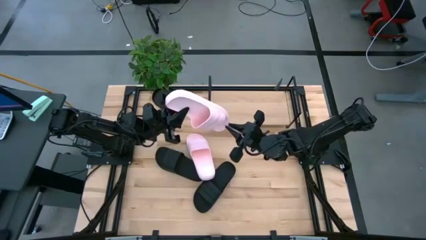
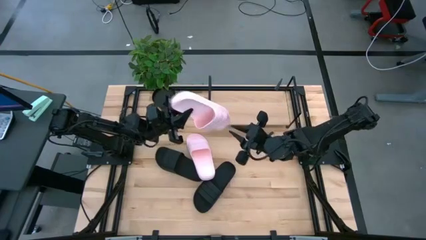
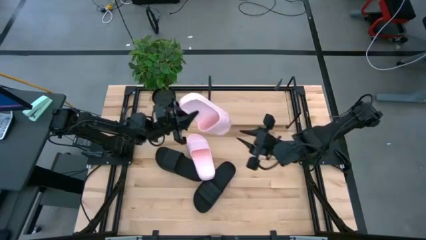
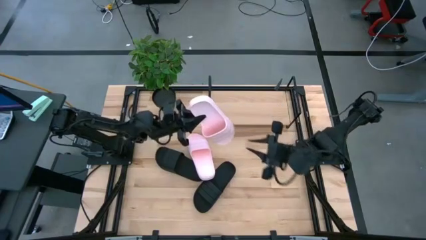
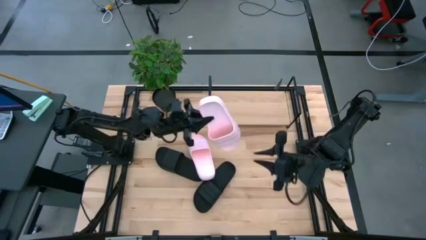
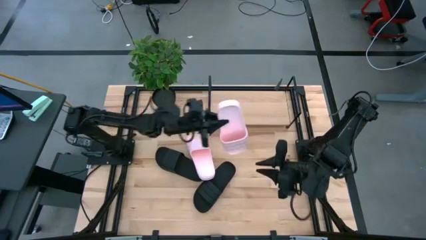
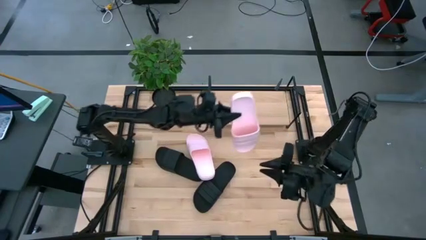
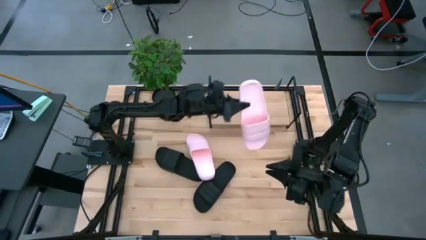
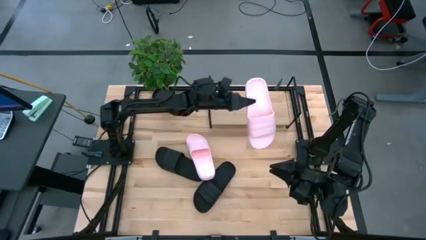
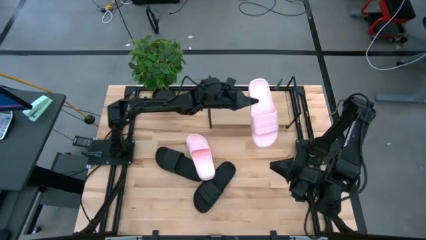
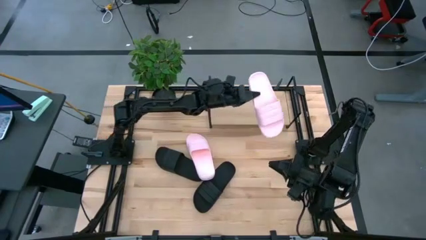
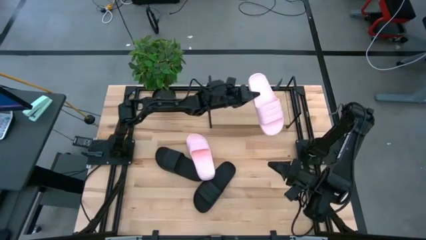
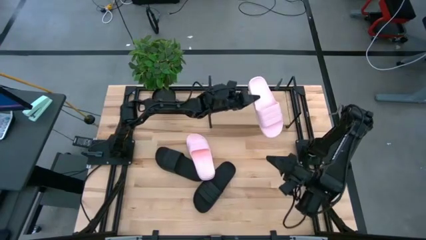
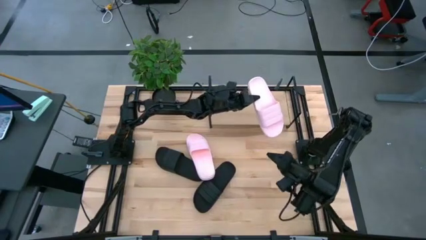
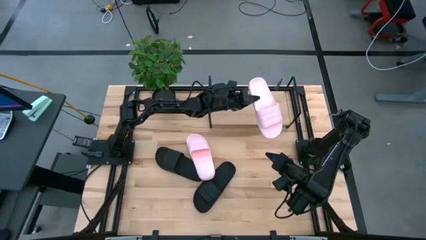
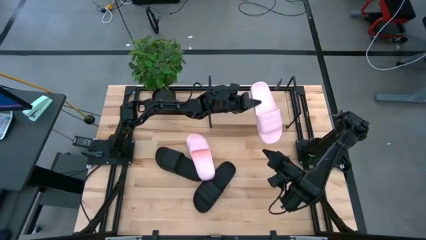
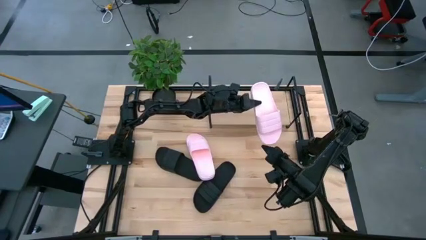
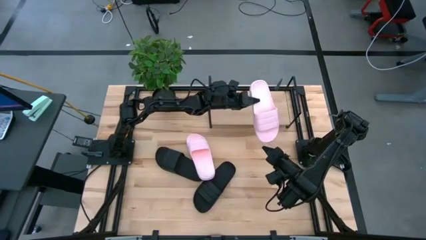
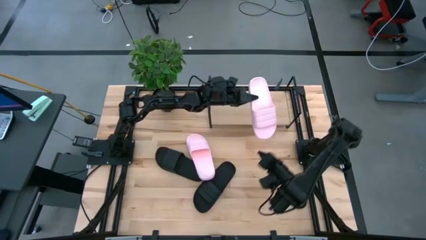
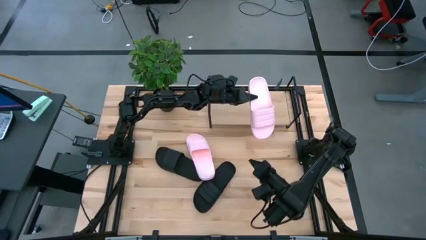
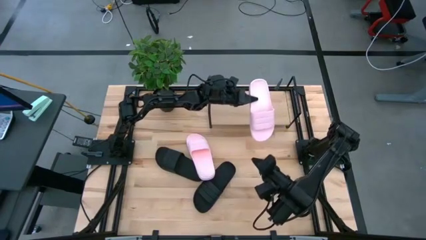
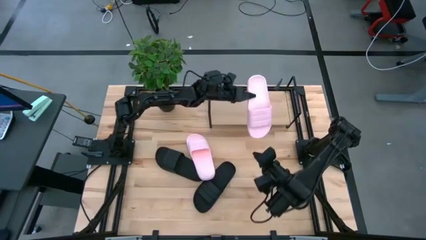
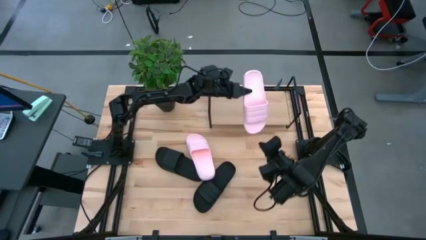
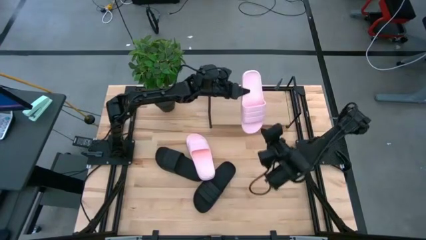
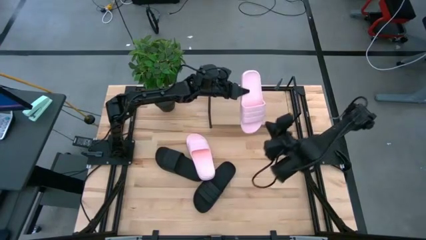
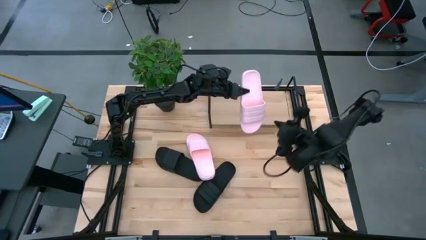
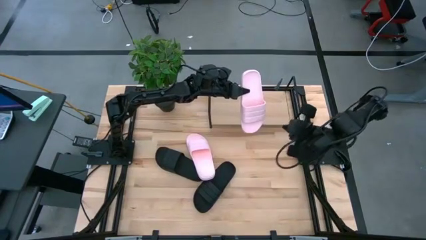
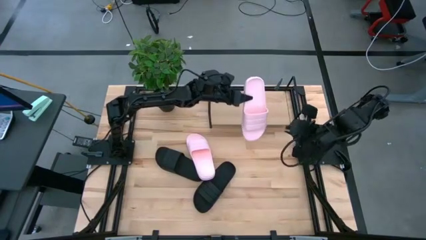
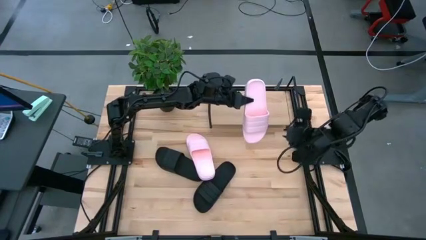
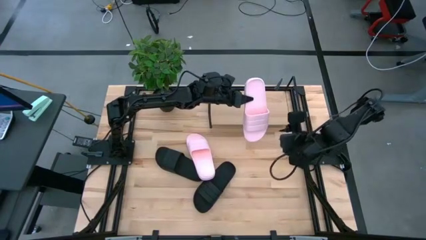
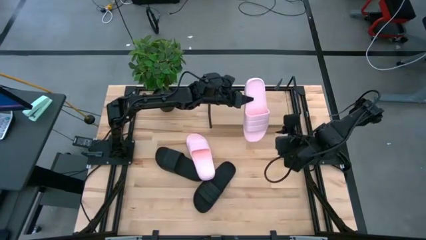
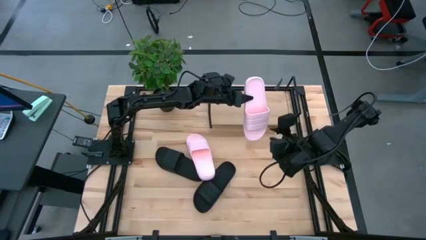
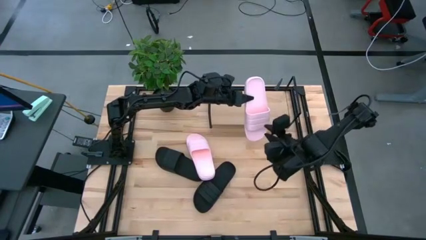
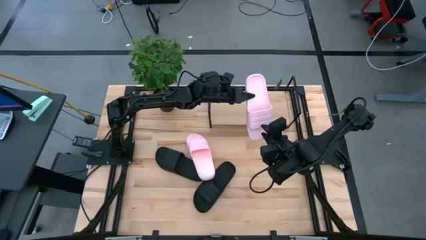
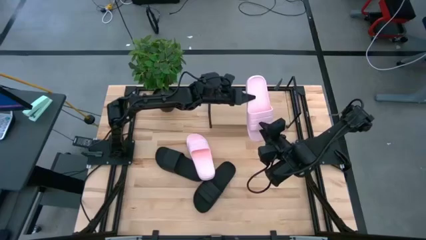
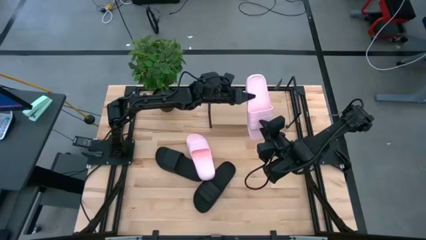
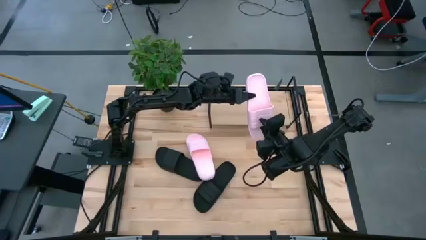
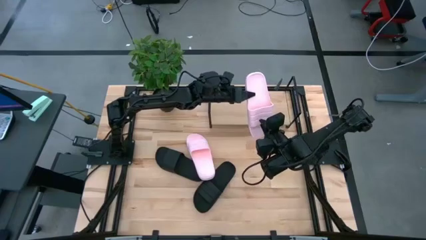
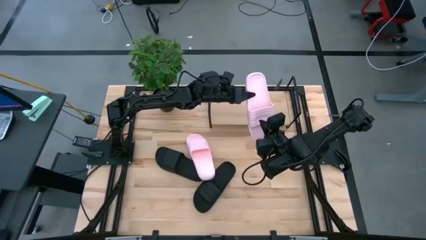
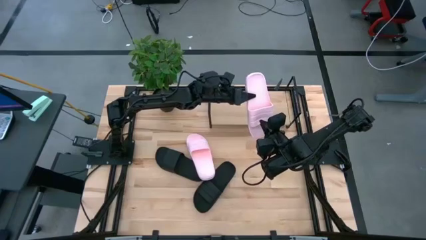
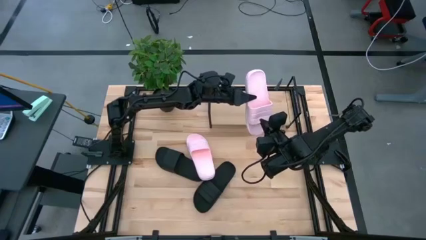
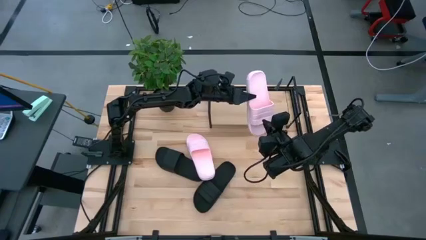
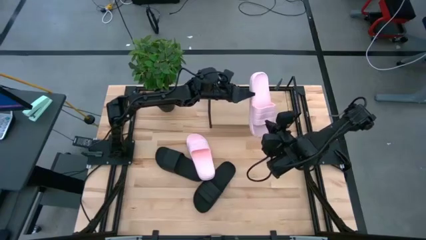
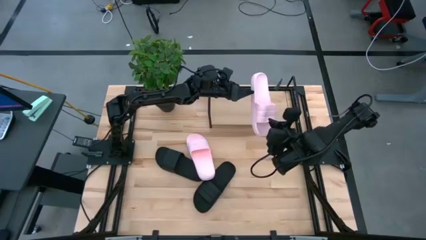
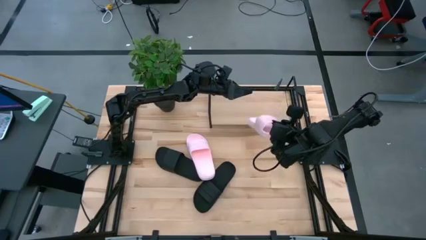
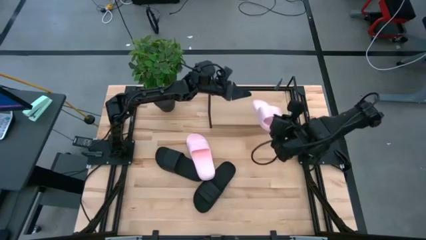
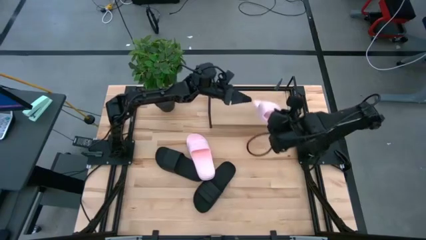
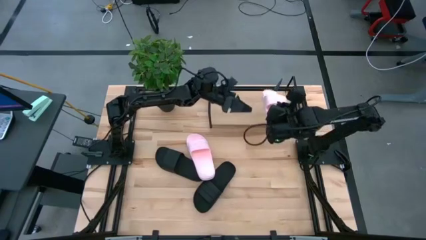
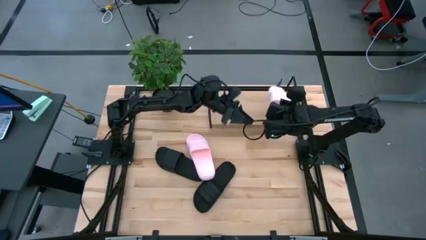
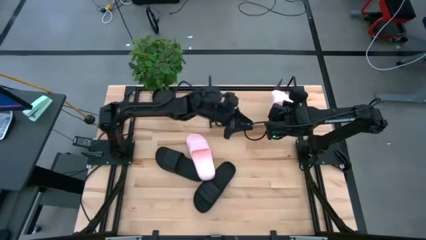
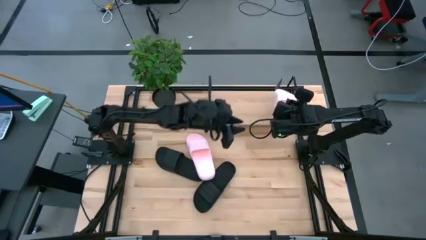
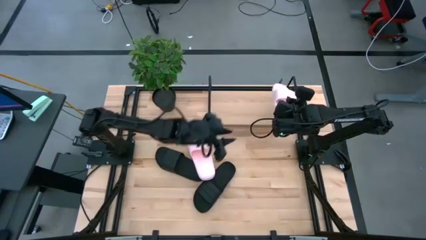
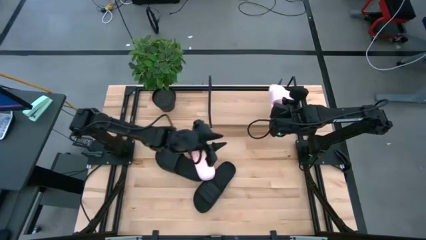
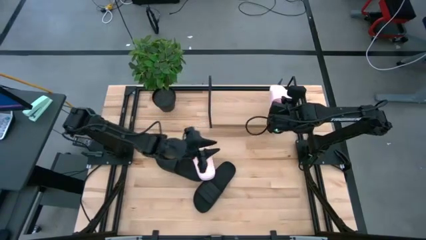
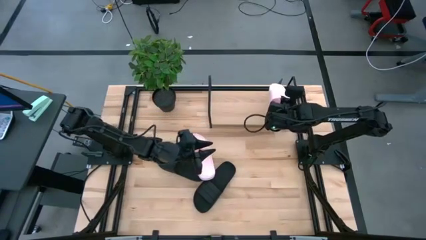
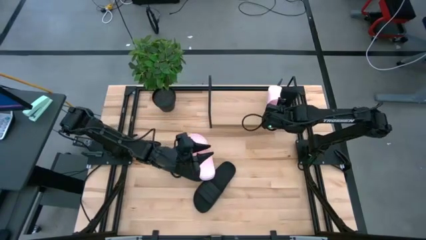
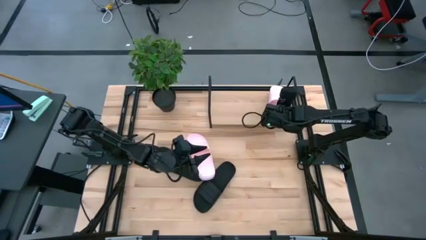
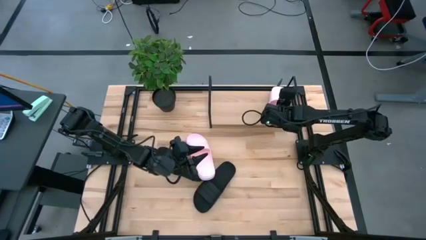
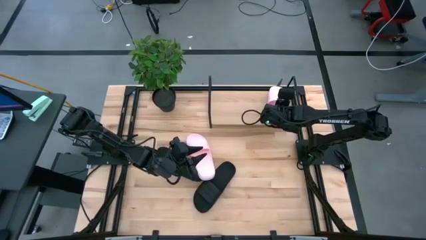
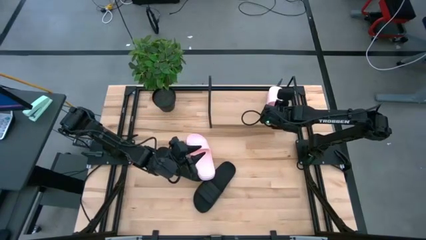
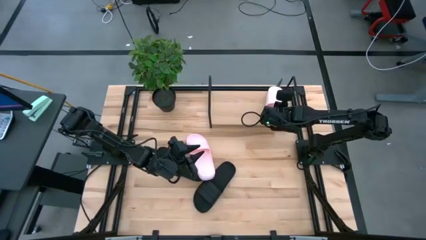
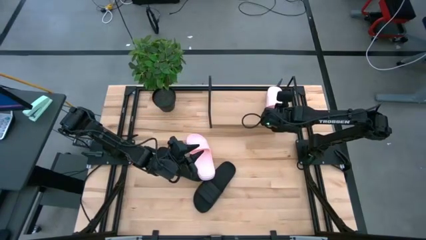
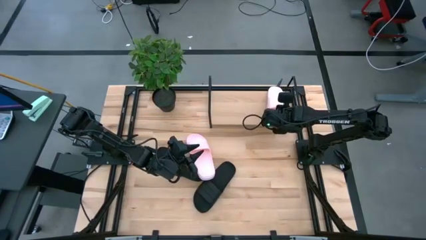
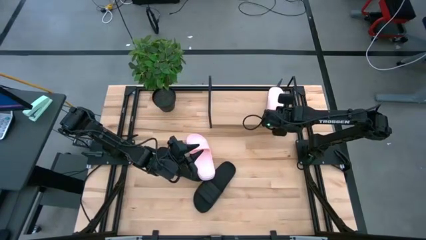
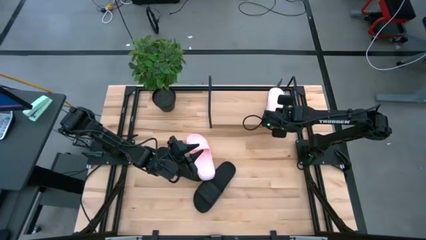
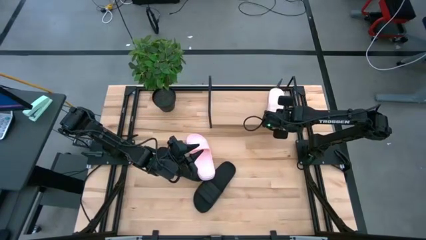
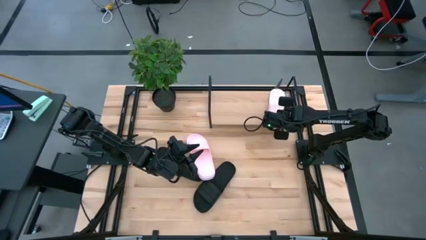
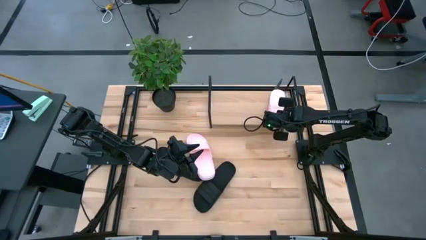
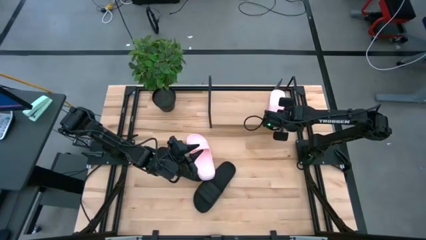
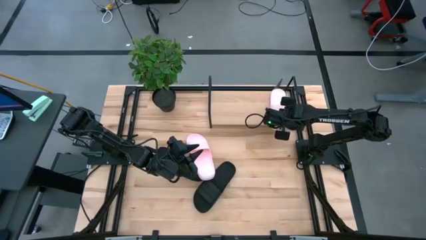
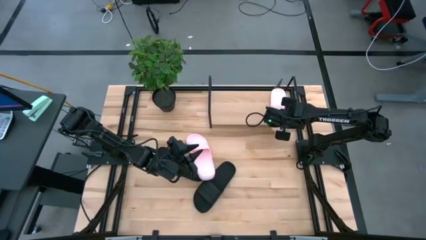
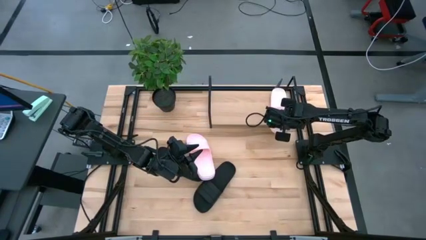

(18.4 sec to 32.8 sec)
Task: Pick and place slides into the shelf
Put the right pink slide on the shelf

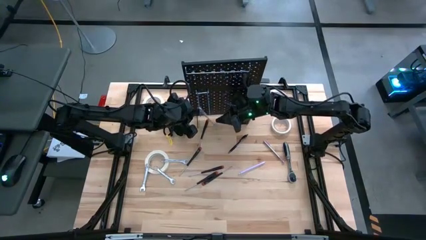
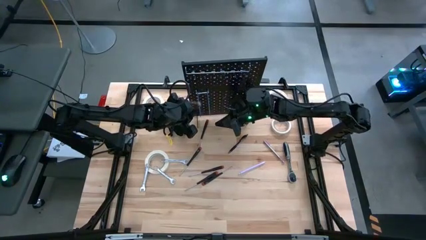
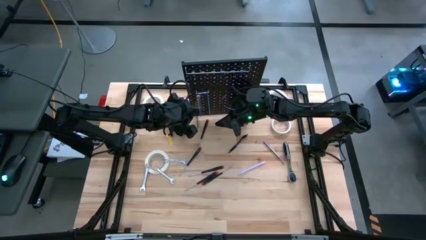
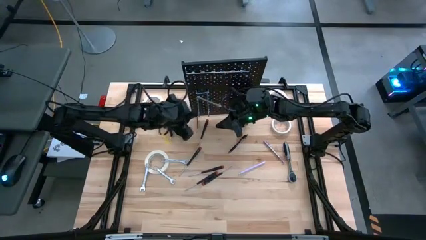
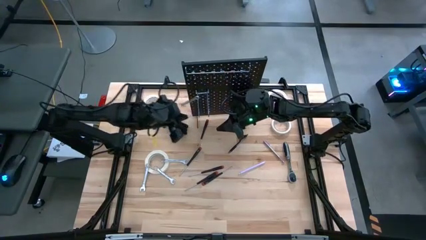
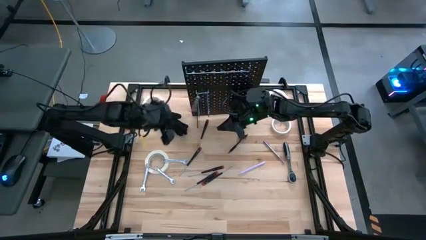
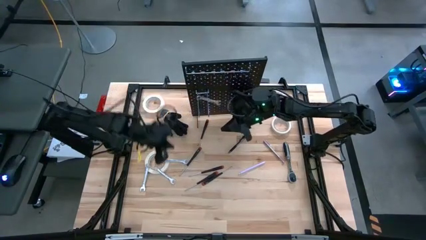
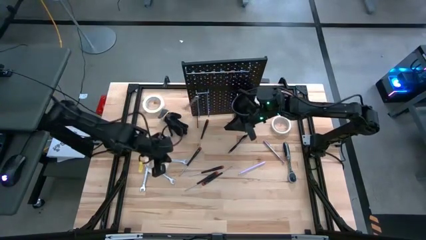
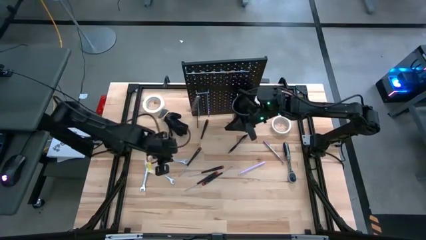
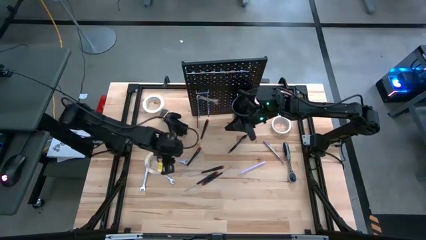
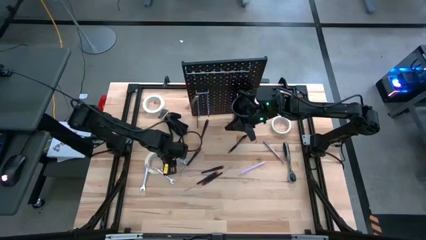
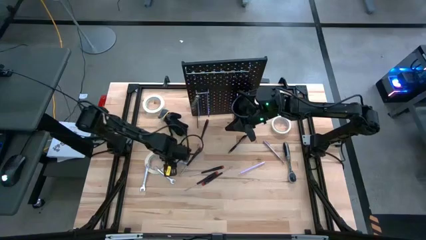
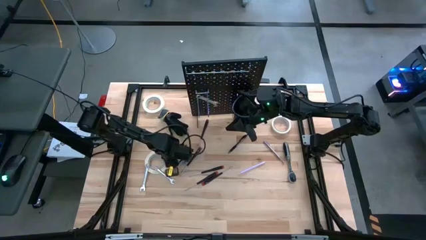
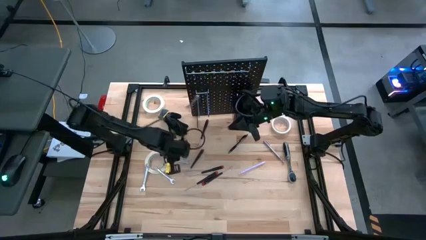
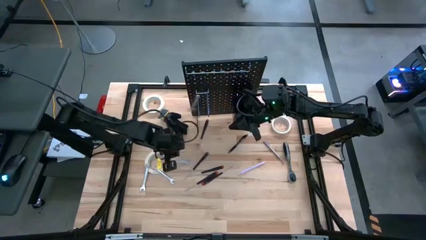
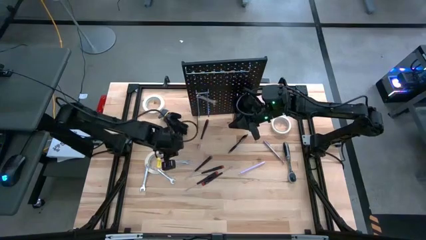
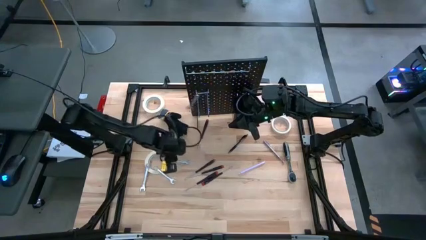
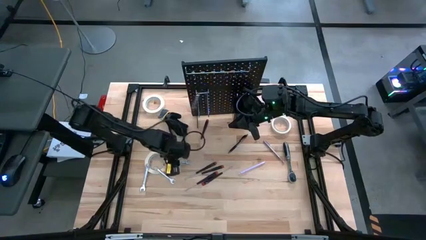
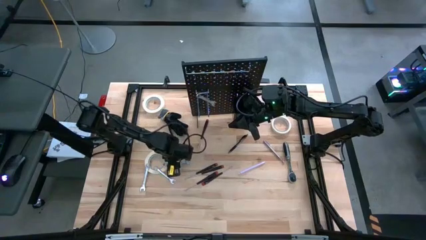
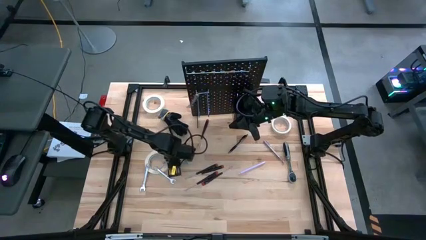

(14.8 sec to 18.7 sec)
Task: Hang tools onto peg board
Hang the silver wrench on the peg board
